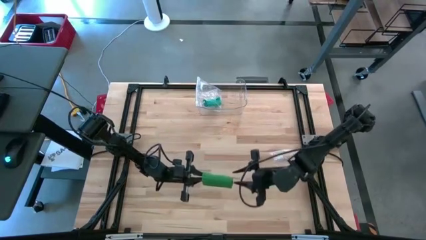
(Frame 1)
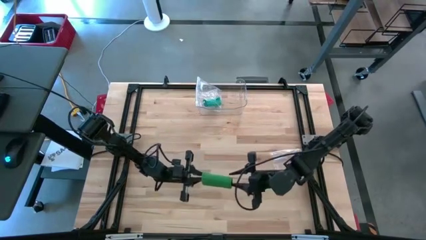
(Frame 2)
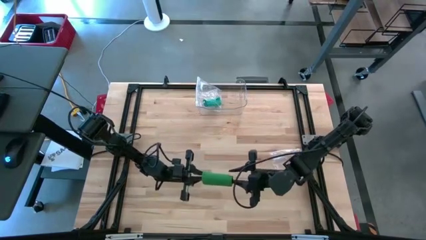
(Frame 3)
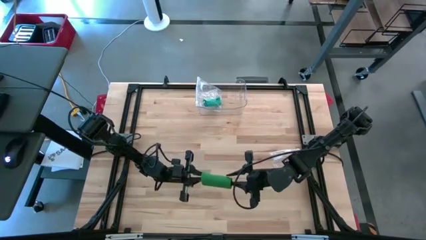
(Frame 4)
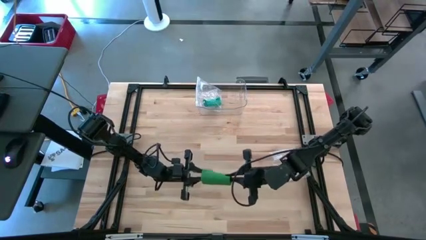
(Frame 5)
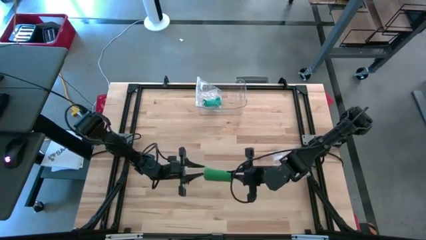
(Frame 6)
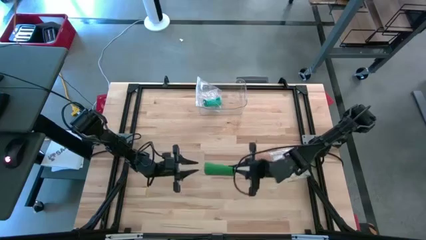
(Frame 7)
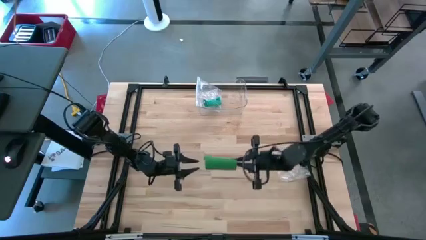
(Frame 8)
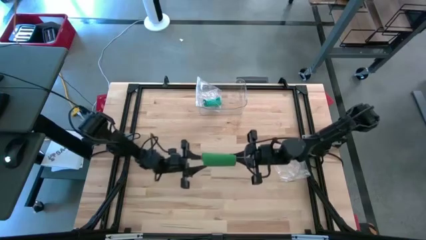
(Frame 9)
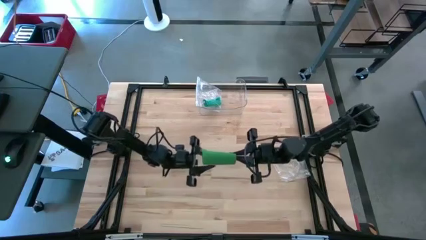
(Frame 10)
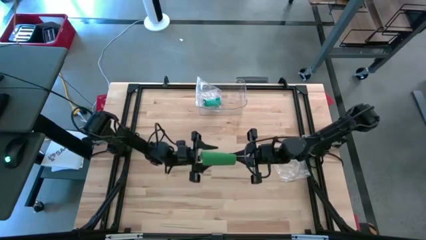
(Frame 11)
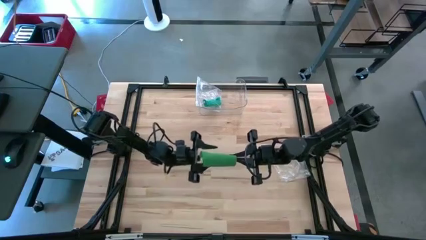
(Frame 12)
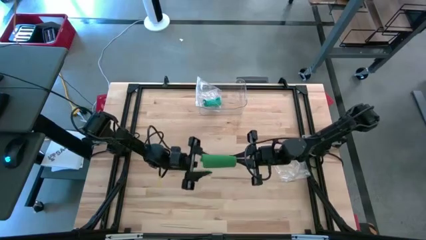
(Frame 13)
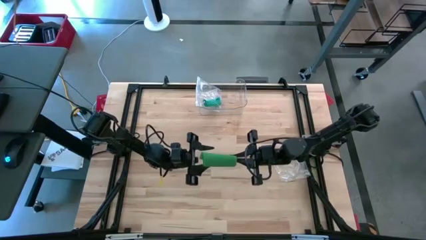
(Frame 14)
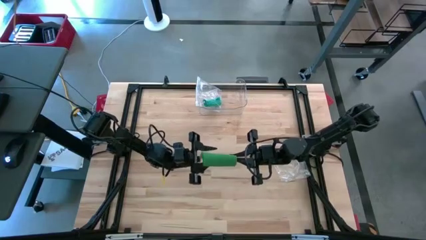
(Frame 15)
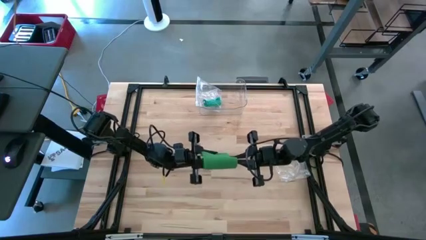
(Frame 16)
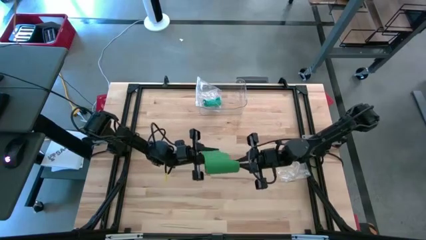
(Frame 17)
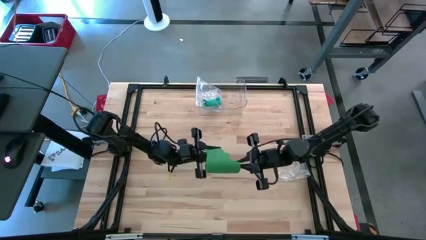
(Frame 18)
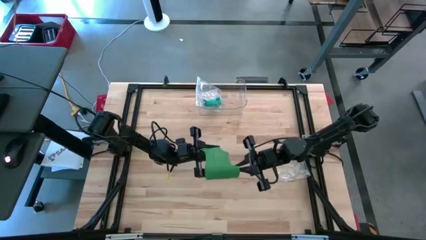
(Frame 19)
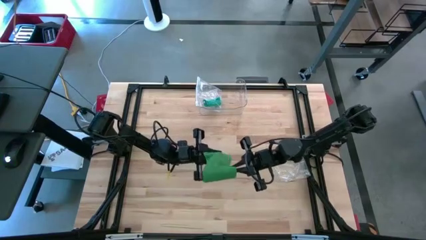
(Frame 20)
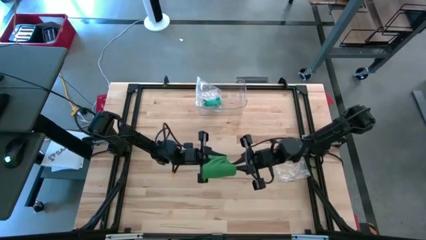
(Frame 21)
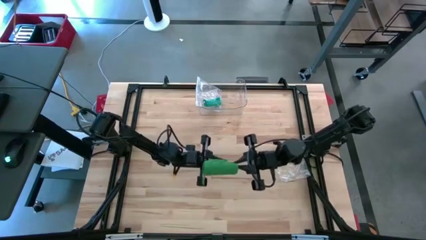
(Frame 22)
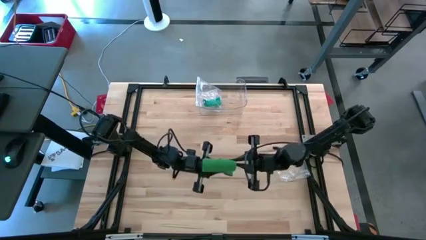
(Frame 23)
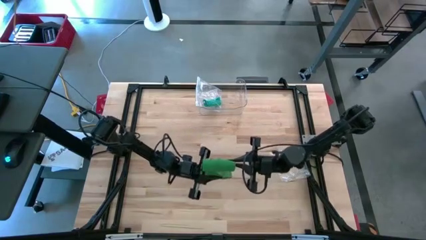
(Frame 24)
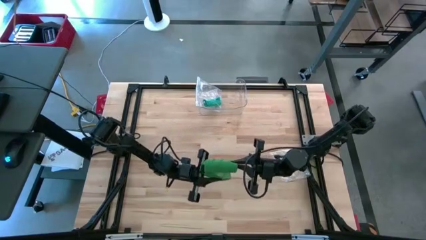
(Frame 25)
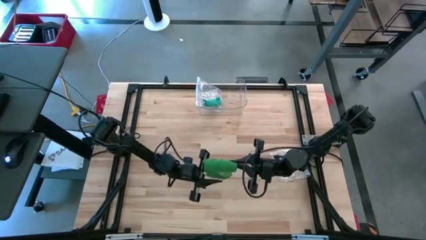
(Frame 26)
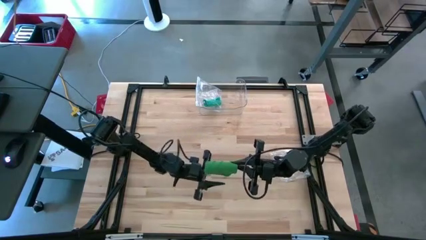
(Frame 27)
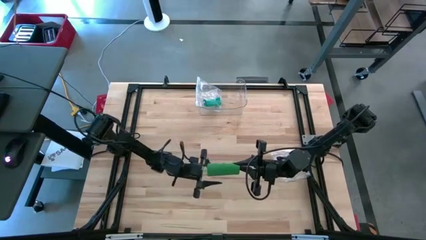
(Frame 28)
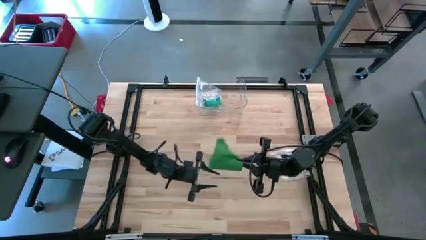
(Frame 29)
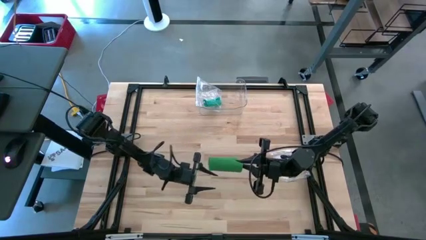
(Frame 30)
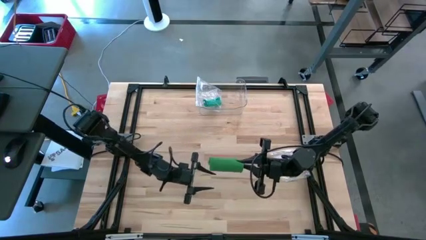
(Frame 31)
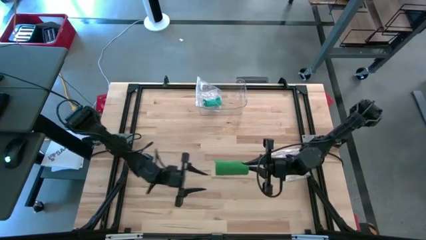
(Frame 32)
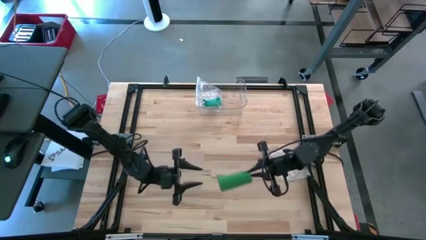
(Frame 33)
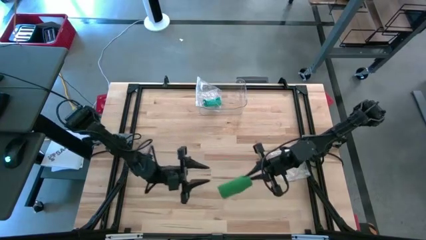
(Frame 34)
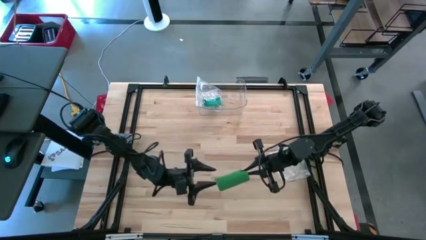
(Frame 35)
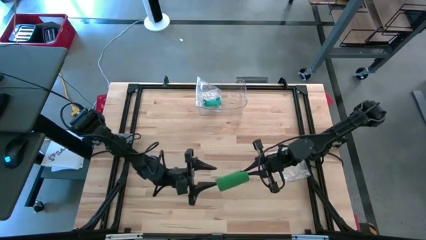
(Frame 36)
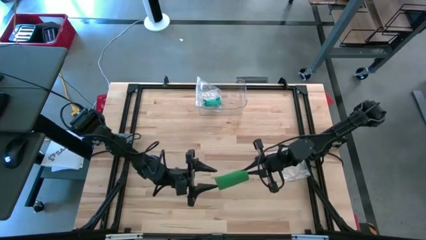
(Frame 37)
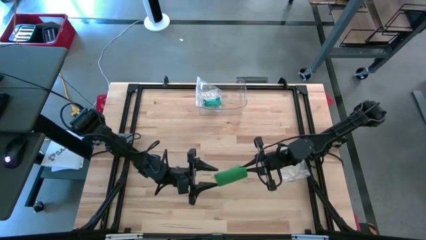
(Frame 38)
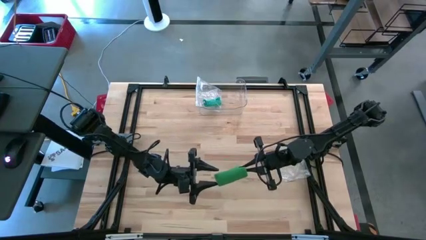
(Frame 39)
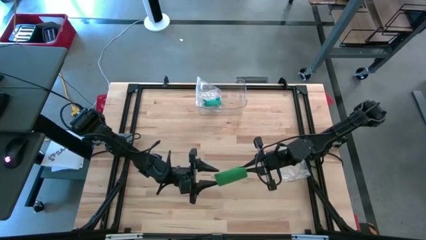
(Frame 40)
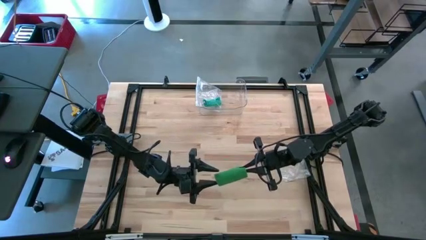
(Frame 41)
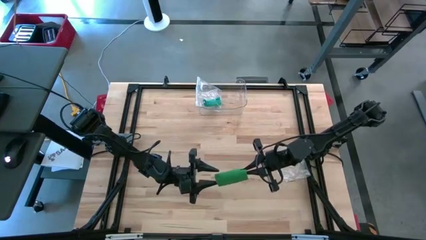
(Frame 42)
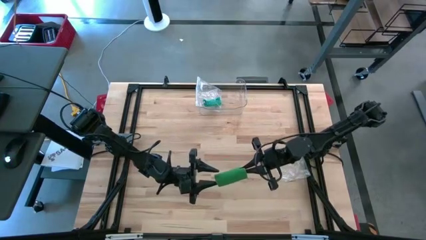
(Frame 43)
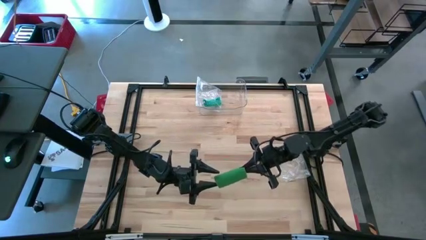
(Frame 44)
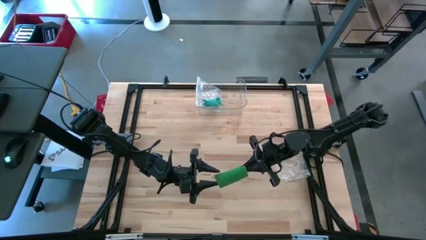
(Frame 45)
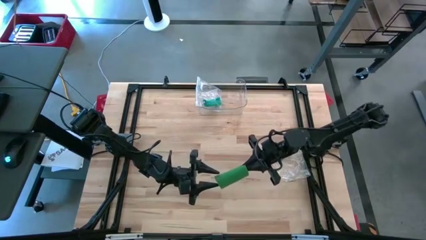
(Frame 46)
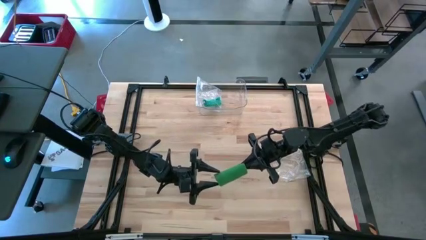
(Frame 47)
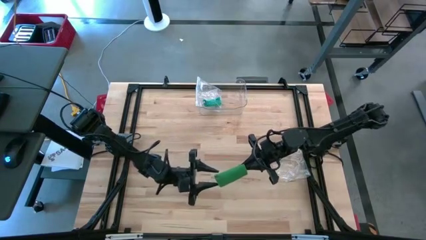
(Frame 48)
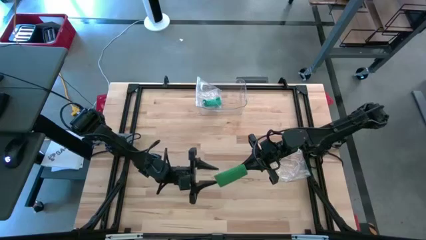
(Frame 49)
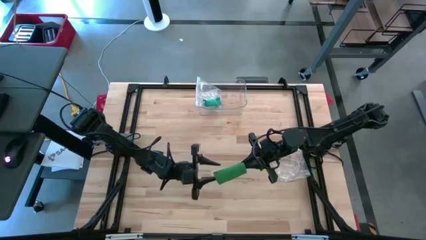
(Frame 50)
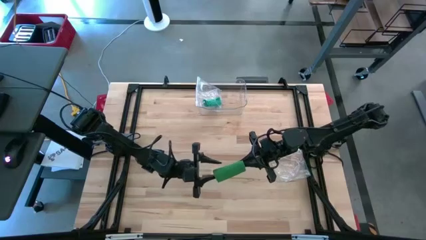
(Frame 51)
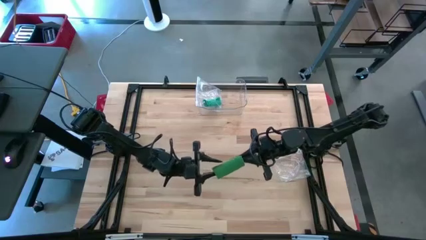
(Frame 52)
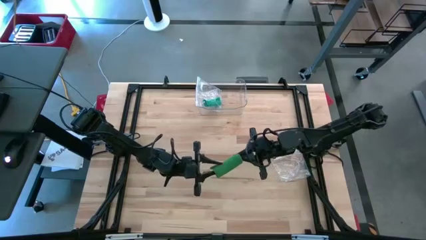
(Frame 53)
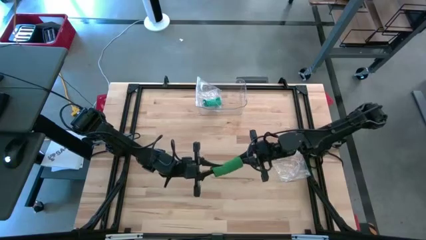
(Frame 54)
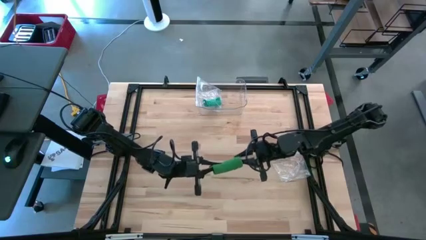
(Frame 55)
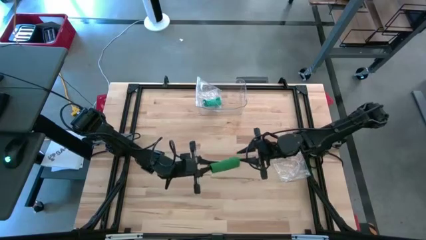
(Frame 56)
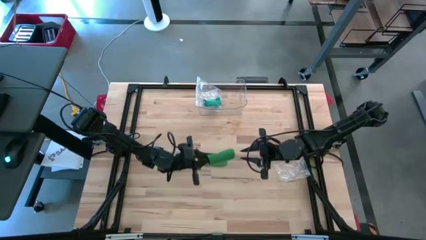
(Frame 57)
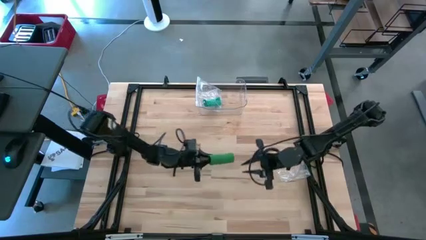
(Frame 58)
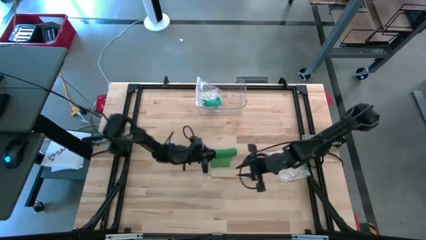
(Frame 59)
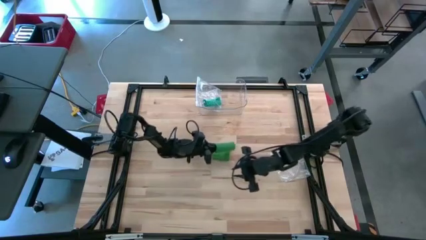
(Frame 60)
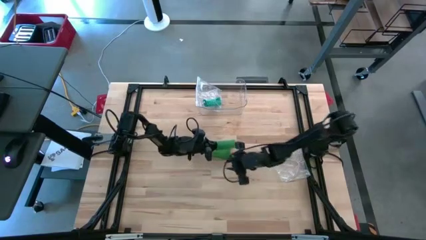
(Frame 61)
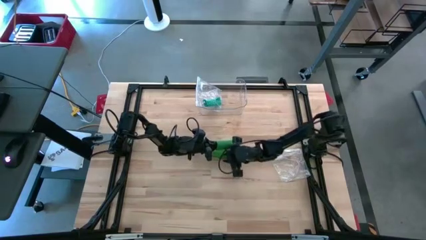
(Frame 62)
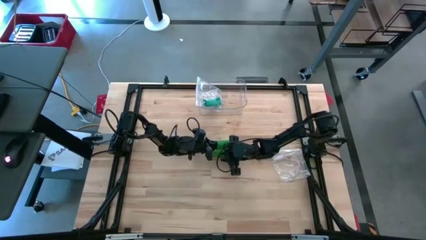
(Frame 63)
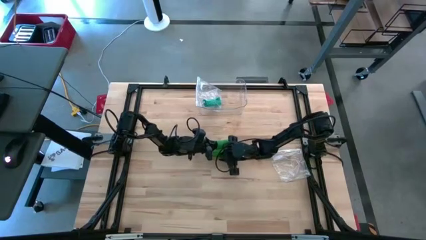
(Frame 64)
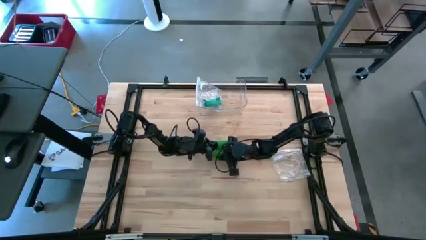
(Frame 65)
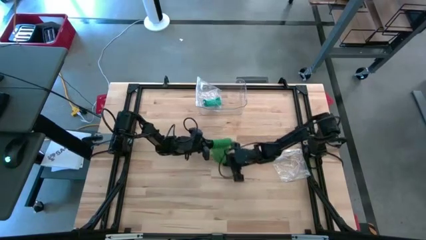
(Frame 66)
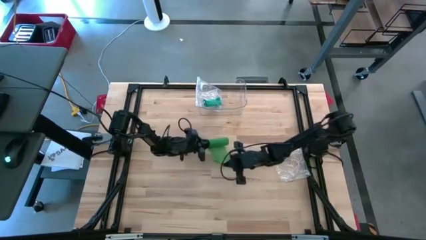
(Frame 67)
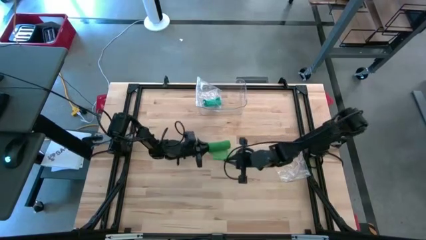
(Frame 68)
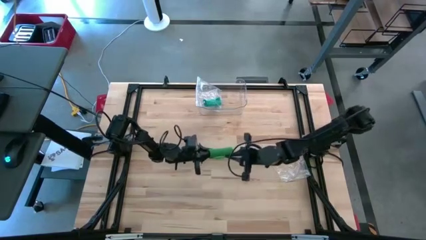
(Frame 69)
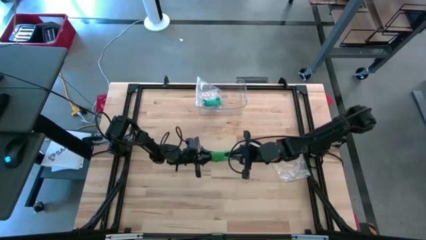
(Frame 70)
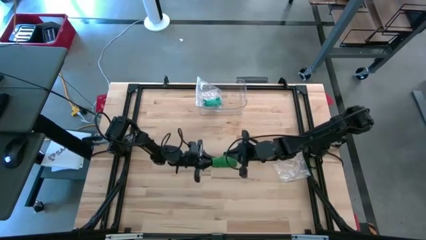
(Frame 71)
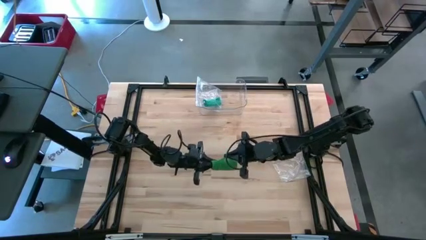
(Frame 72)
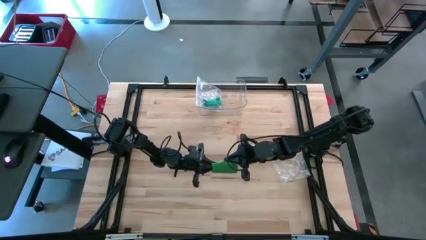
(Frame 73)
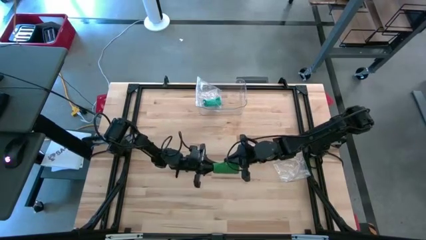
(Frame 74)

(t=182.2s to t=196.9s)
Task: Roll bandage
Roll the green bandage

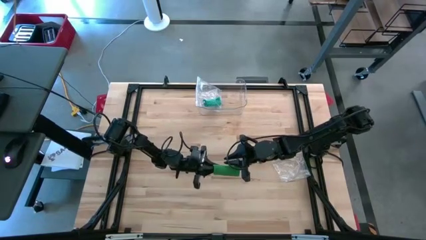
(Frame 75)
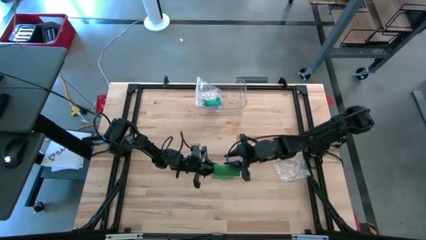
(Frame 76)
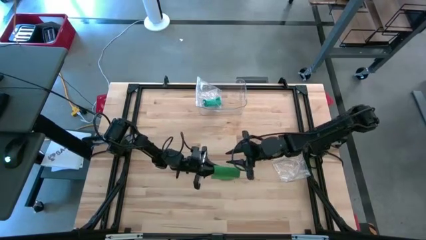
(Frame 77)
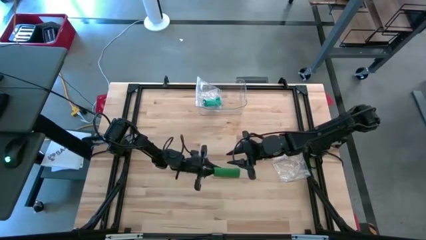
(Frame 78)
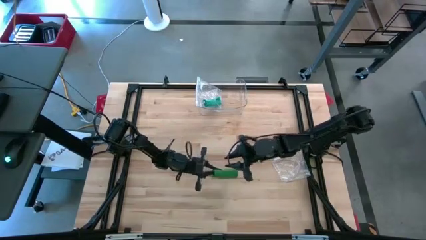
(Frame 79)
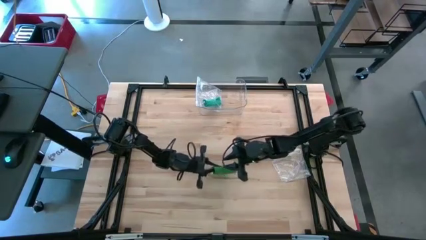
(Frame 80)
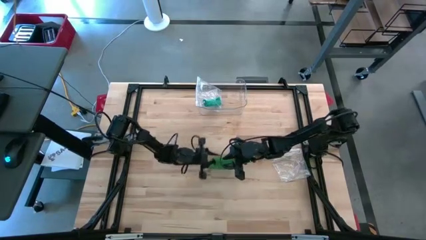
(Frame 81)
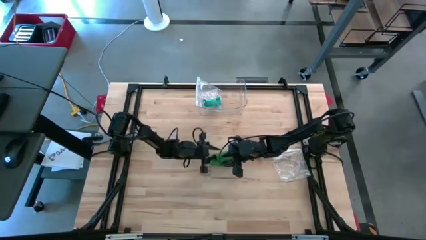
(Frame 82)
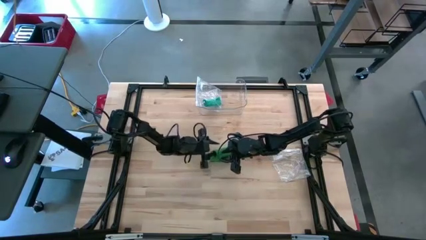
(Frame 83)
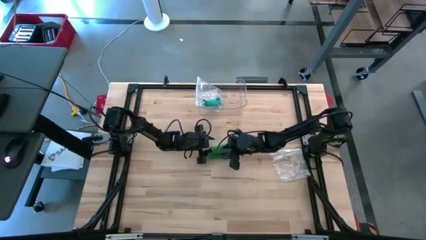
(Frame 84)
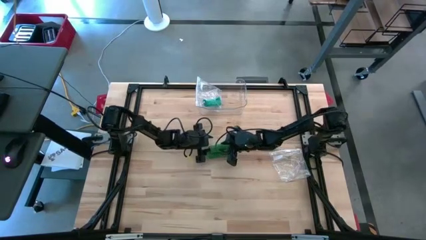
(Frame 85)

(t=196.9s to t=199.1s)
Roll the green bandage

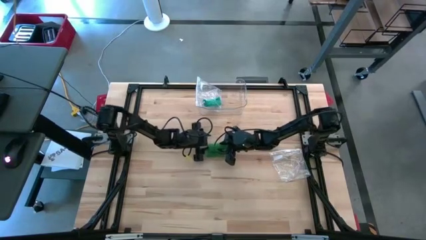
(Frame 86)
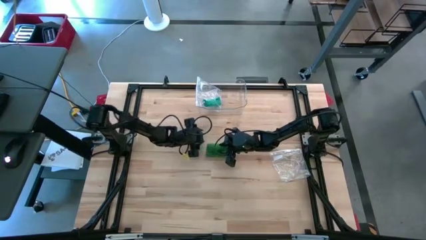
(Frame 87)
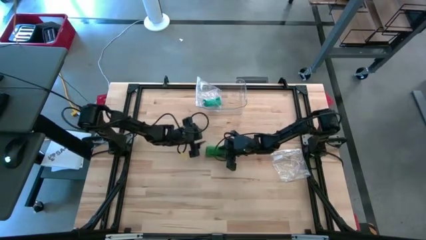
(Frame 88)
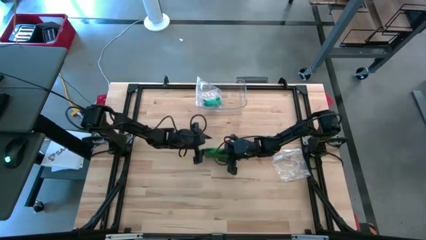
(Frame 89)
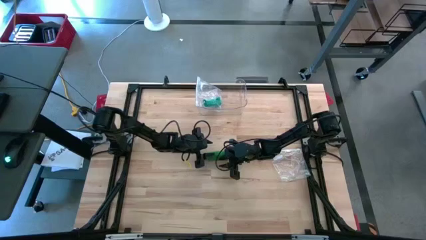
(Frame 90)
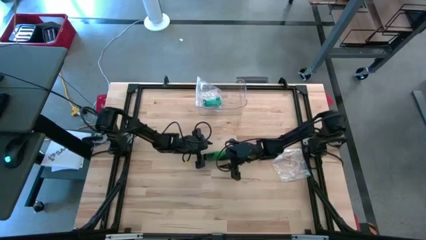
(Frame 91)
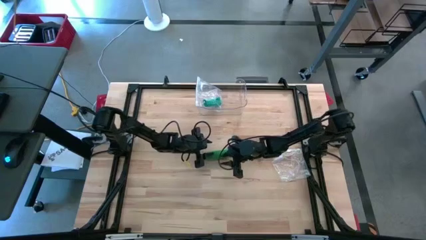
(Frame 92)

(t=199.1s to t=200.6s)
Roll the green bandage
